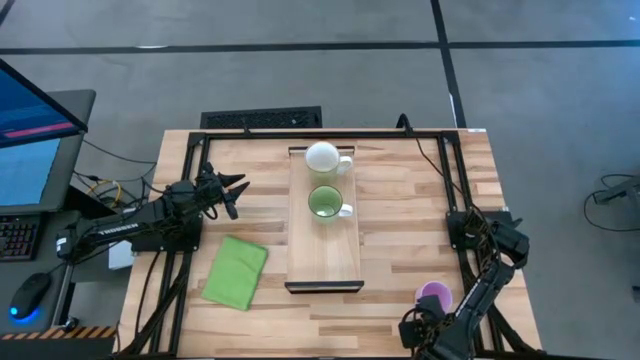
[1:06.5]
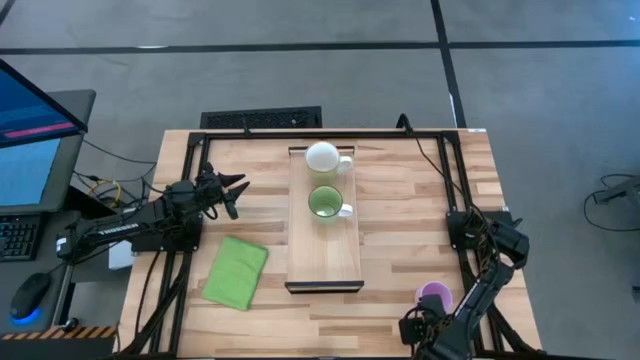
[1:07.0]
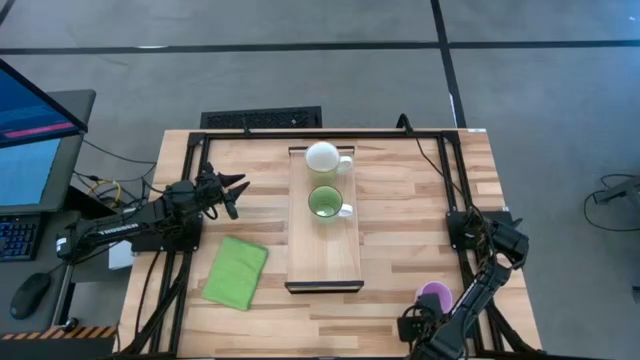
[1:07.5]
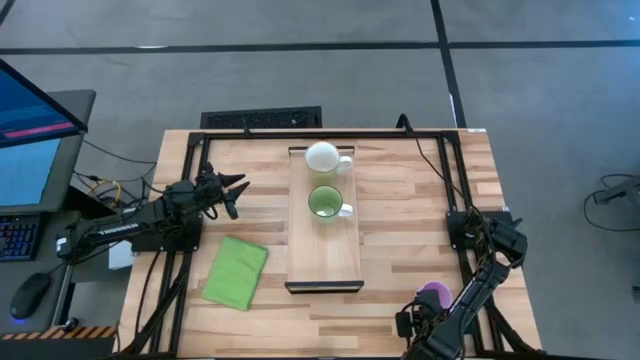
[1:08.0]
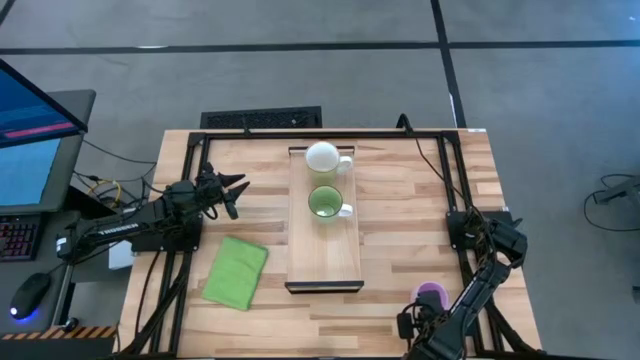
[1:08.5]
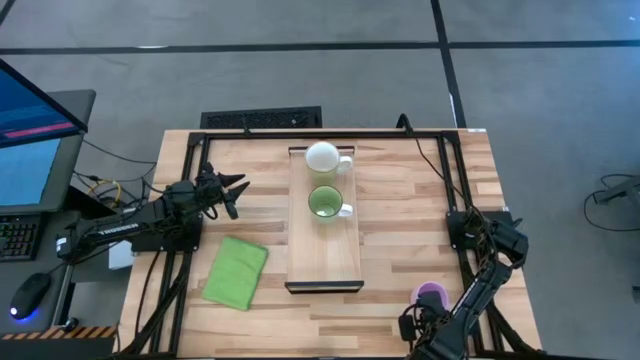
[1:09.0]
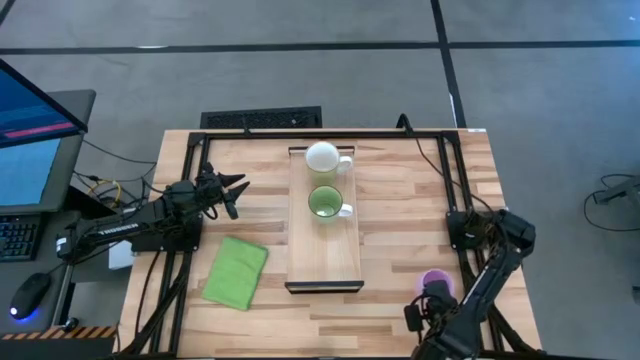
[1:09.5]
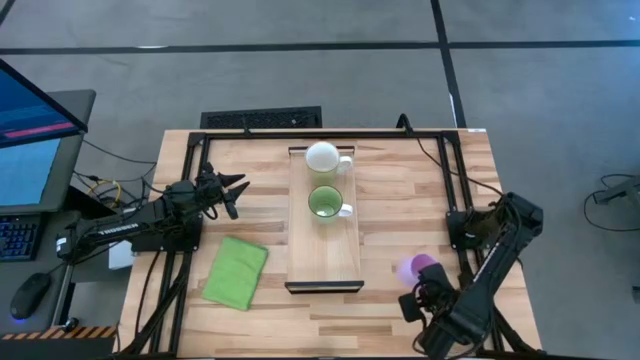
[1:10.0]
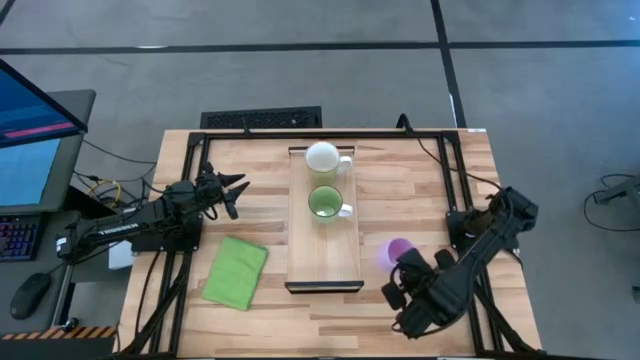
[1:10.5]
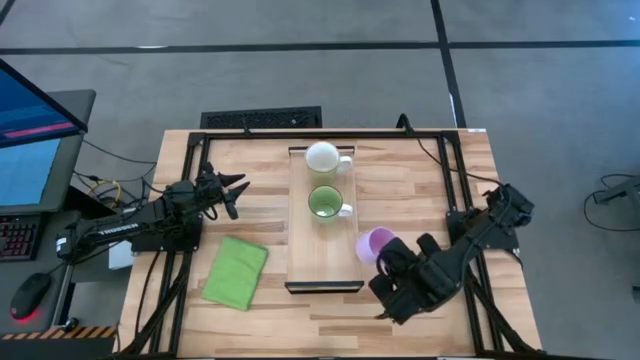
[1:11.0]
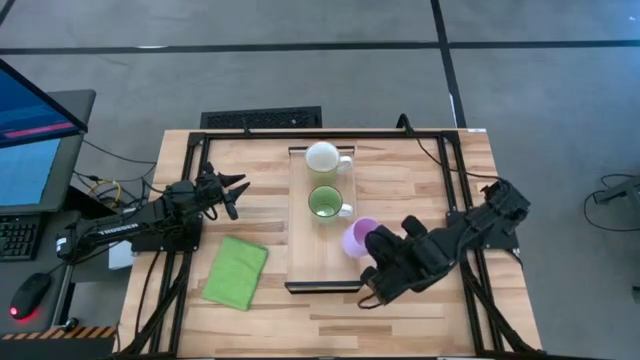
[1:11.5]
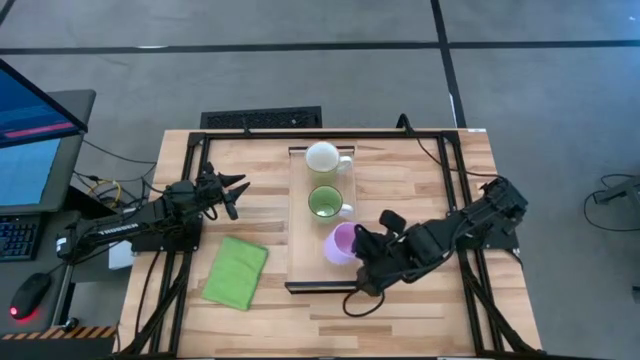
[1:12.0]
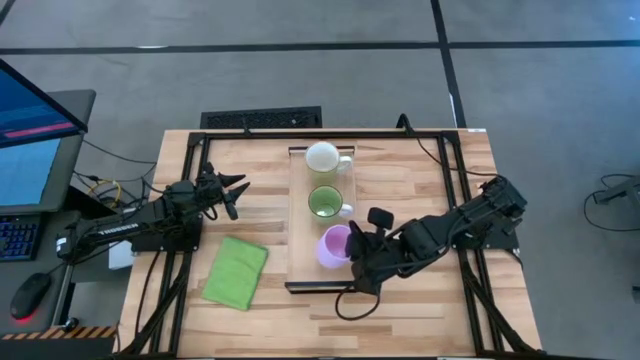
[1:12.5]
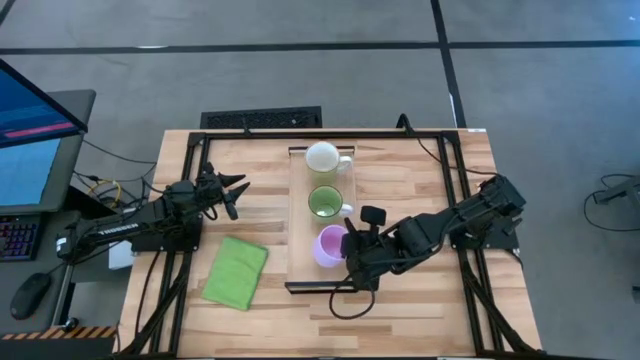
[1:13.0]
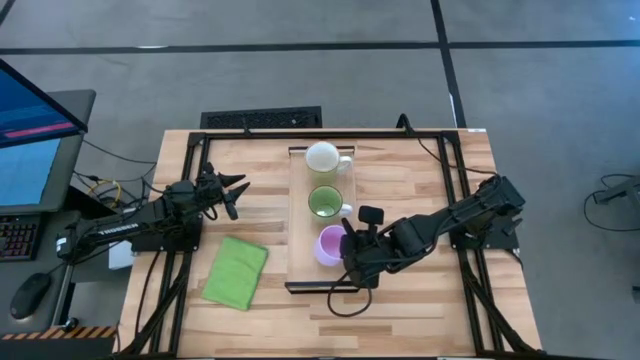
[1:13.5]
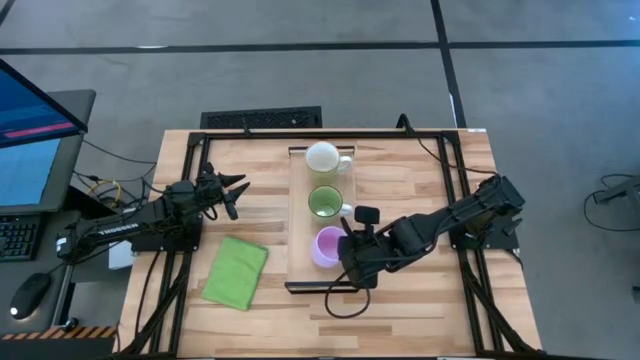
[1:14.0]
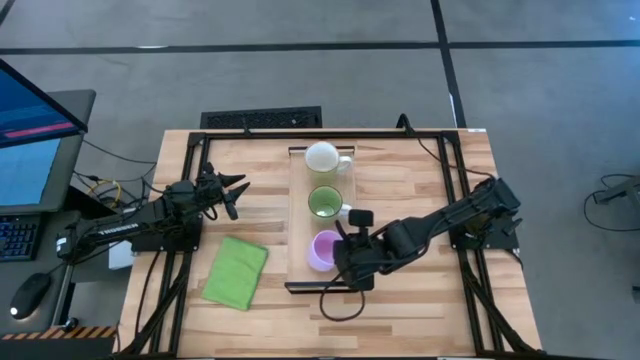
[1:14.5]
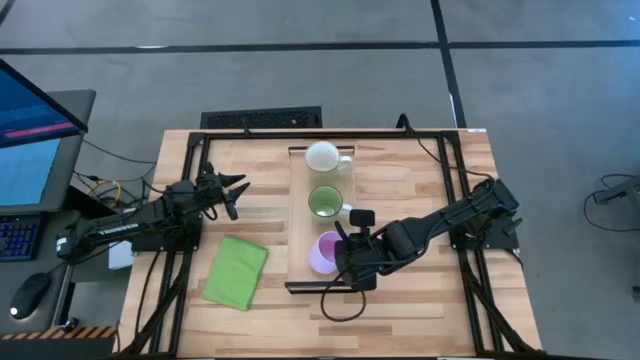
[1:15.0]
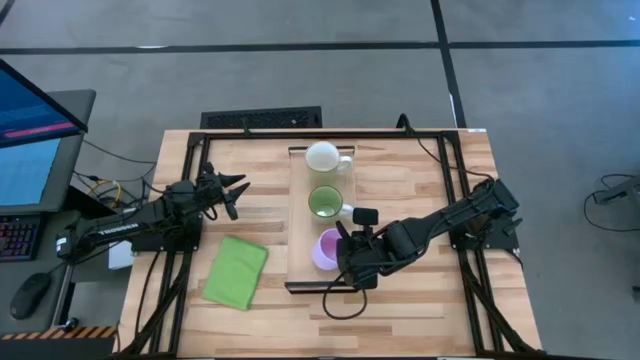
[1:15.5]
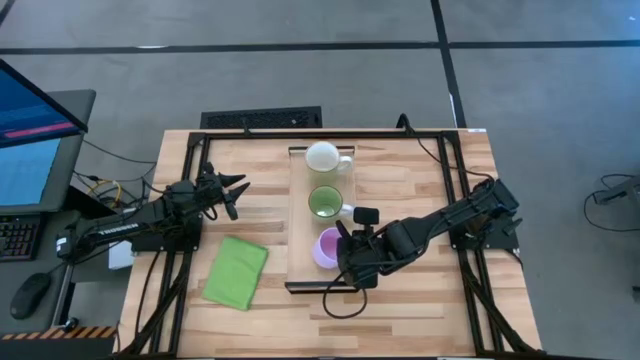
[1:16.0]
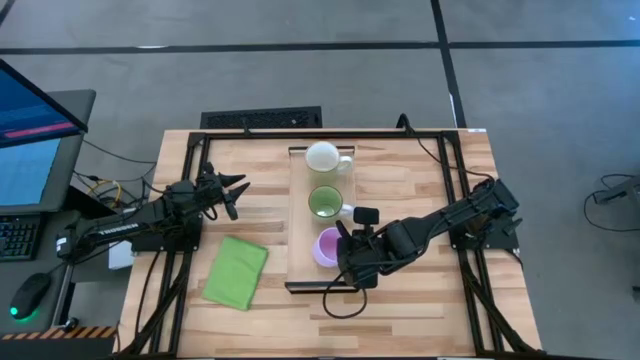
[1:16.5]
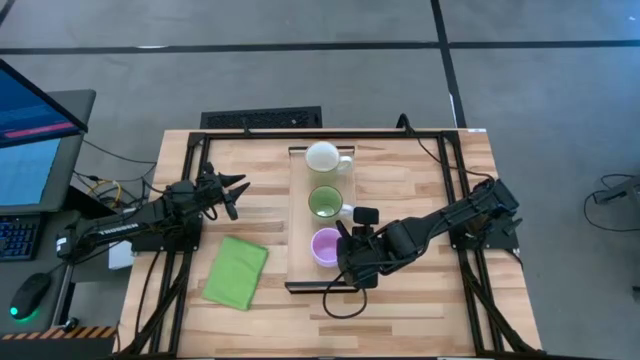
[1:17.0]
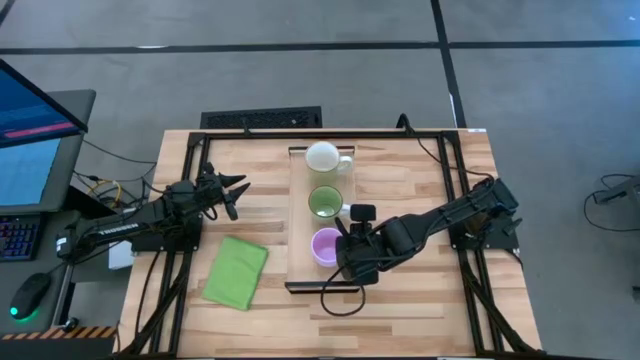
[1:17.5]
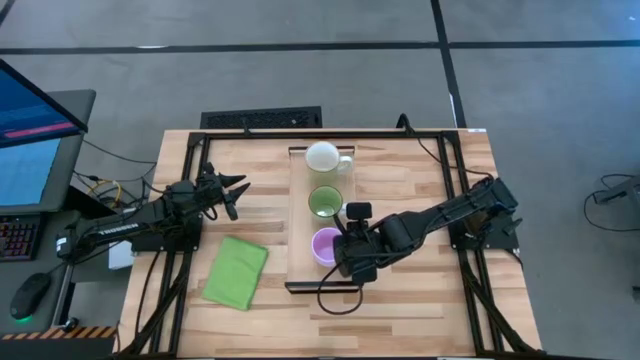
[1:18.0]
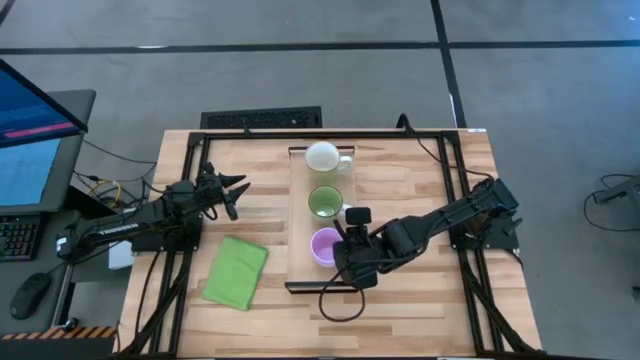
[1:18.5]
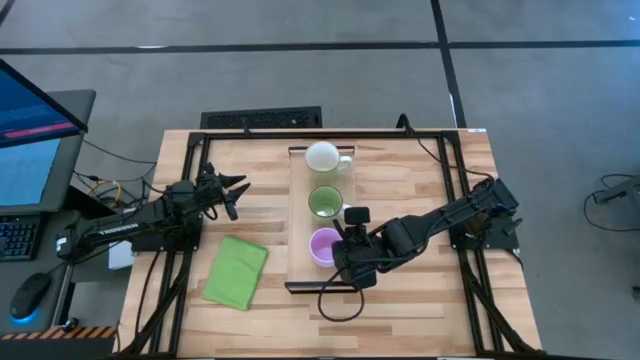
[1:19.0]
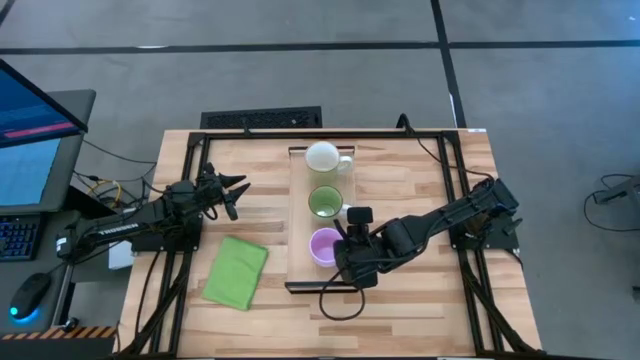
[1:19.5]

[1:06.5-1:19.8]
Task: Stack small to large cups/mugs on shelf
Put the pink mug on the shelf
